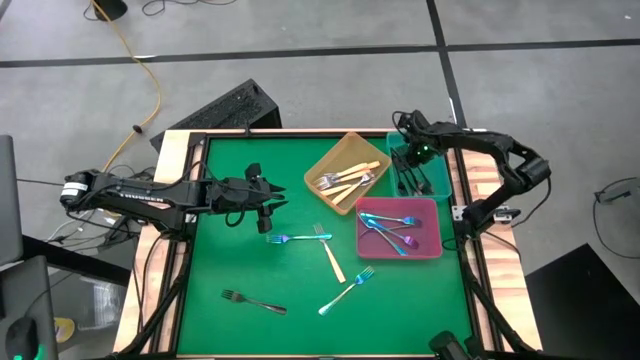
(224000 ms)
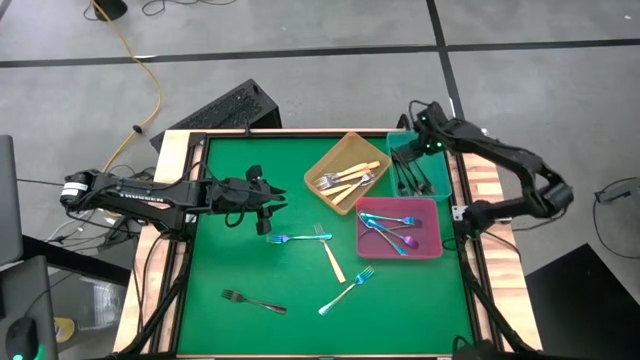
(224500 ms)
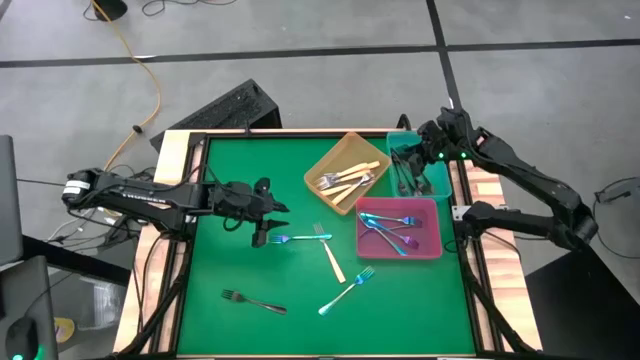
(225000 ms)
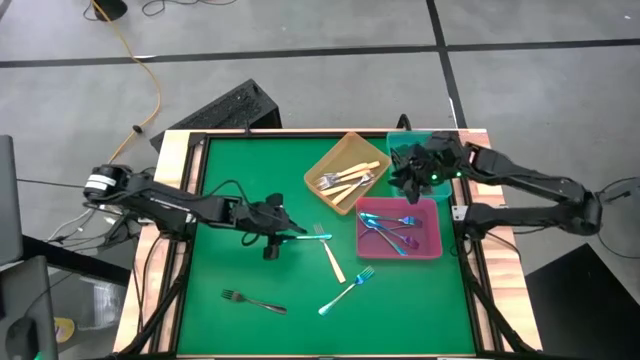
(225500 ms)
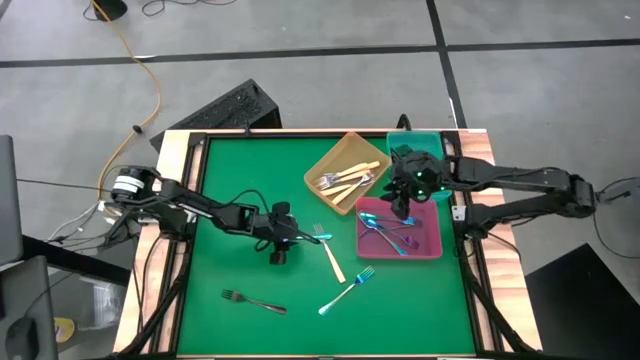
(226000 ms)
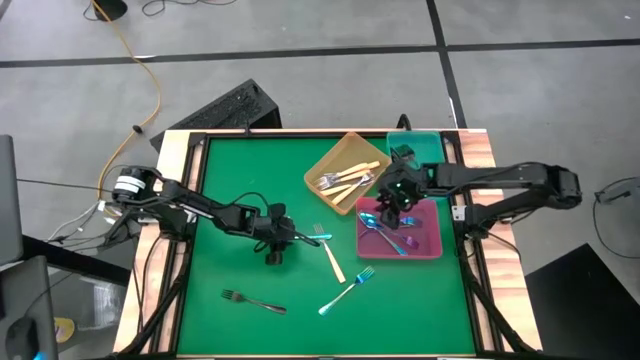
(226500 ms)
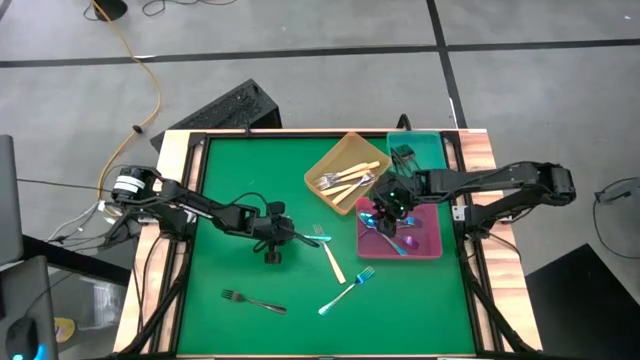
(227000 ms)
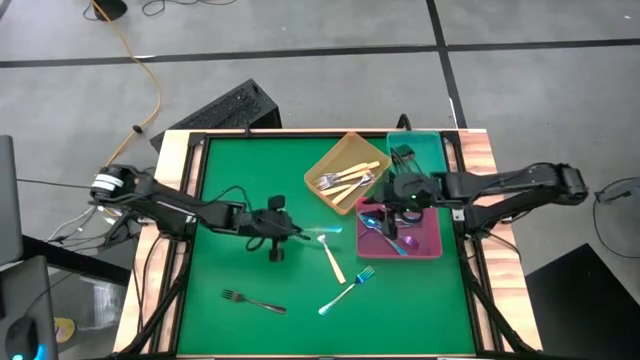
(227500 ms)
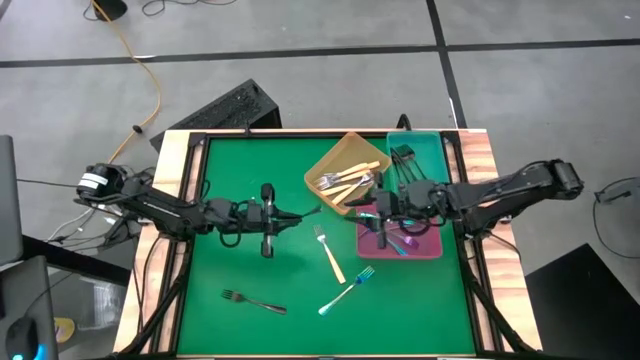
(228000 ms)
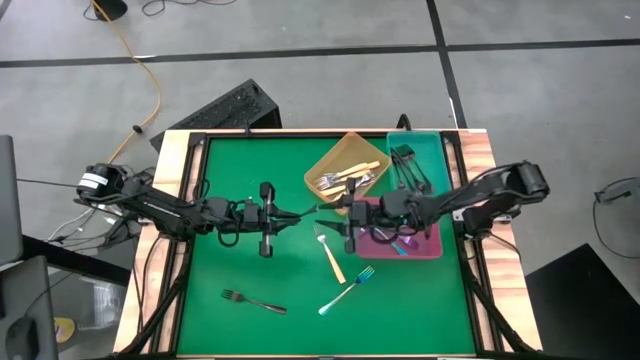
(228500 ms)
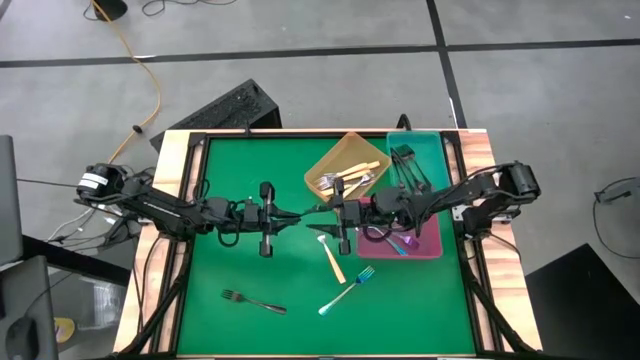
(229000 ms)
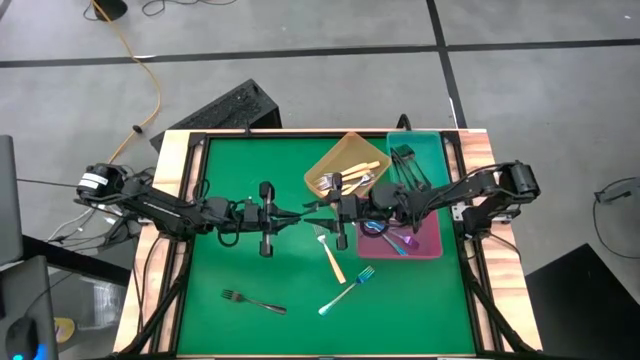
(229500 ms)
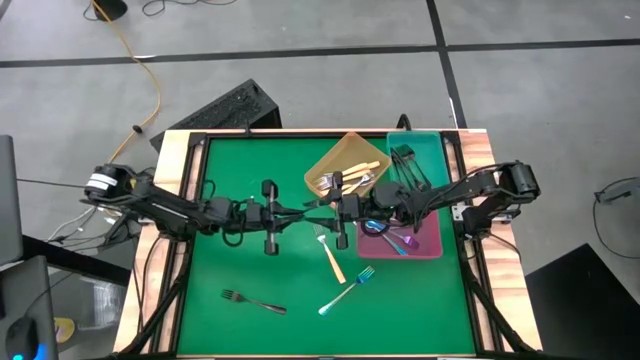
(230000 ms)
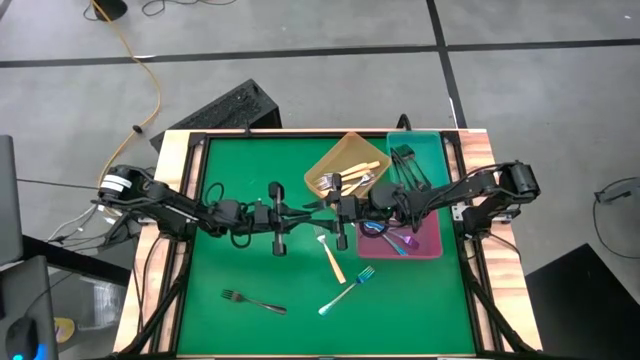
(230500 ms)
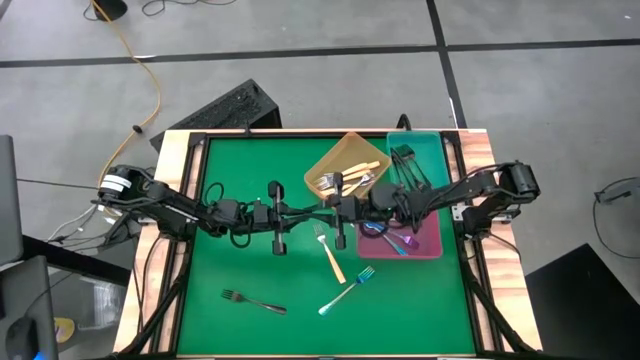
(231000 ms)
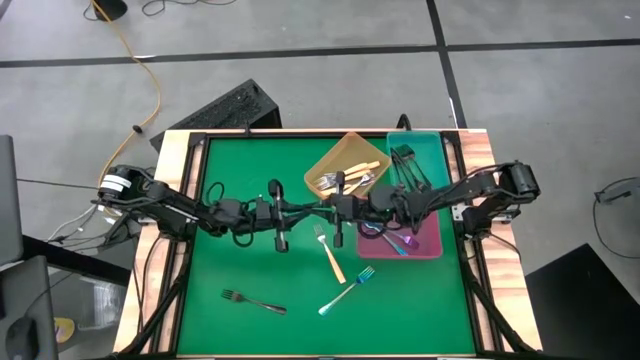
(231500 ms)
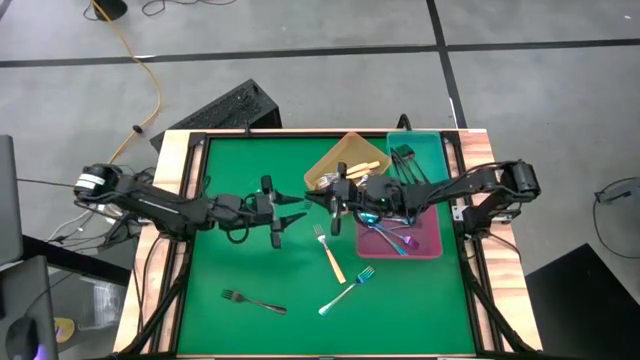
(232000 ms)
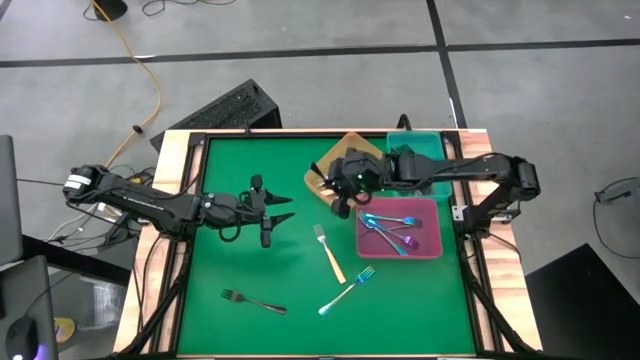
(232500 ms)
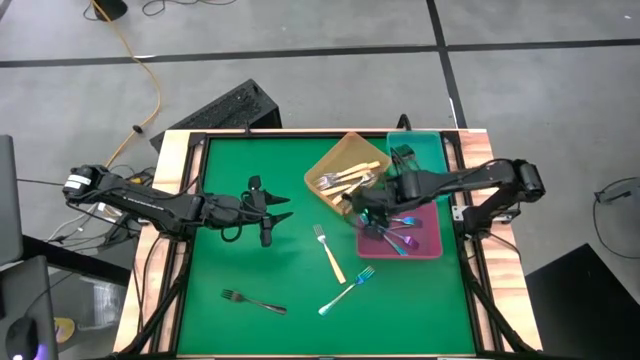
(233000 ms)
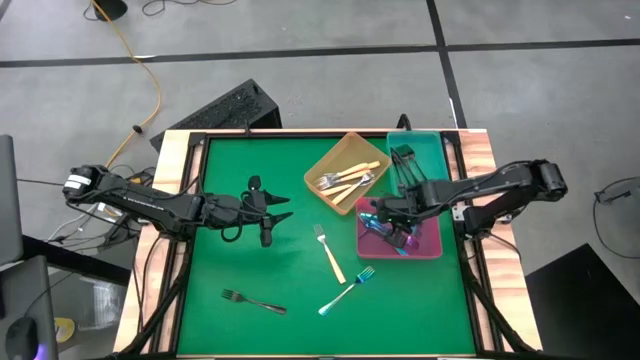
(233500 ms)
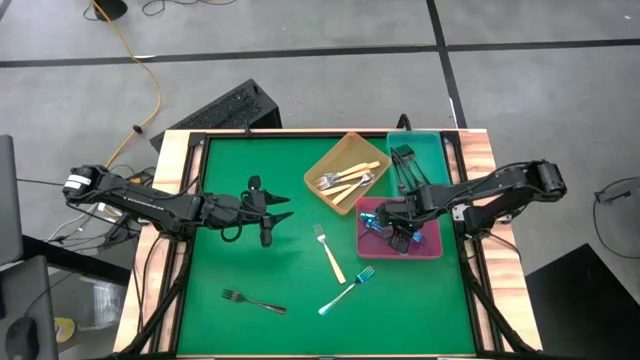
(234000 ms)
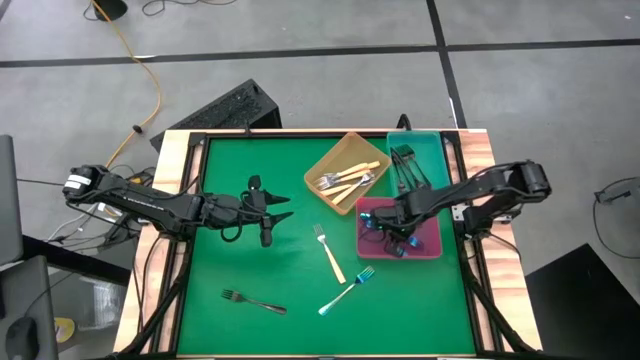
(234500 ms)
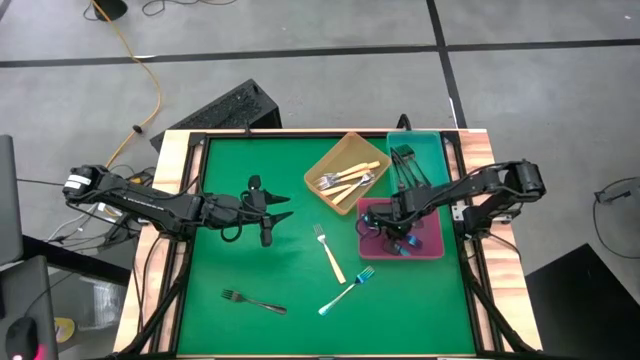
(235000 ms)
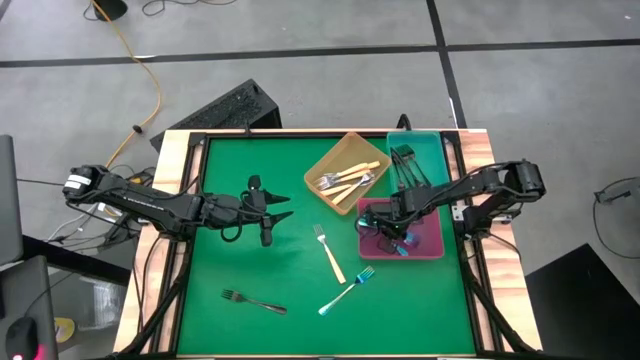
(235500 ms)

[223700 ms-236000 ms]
Task: Sort silverware by color (type)
Put the blue fork into the pink bin

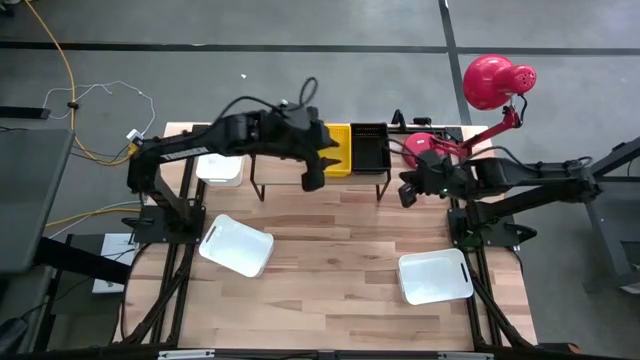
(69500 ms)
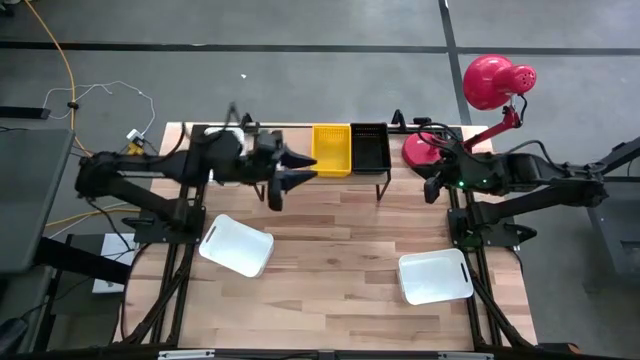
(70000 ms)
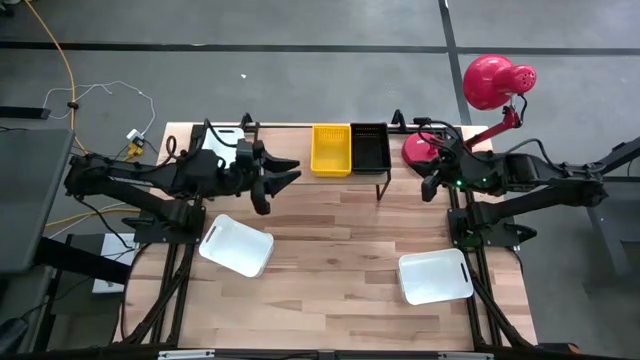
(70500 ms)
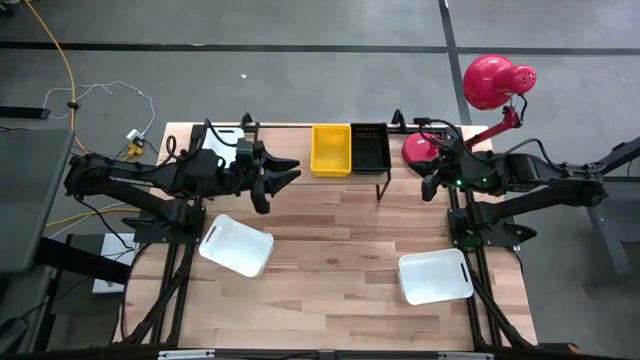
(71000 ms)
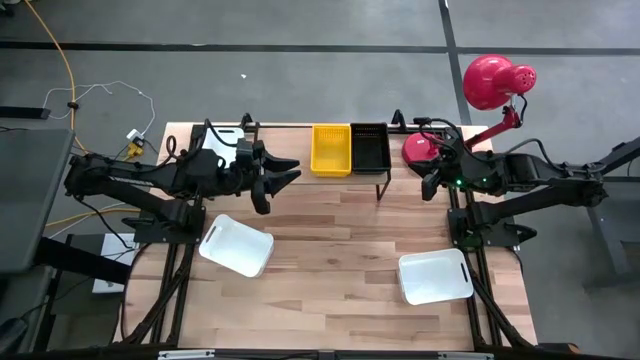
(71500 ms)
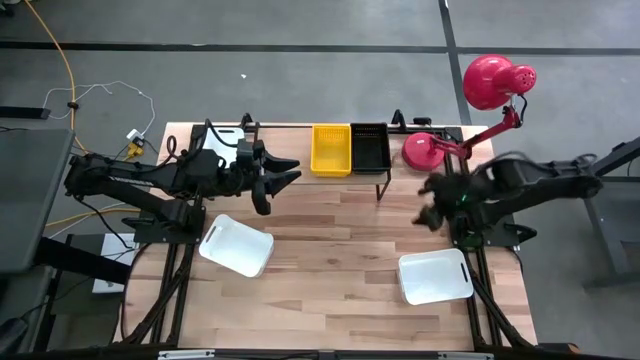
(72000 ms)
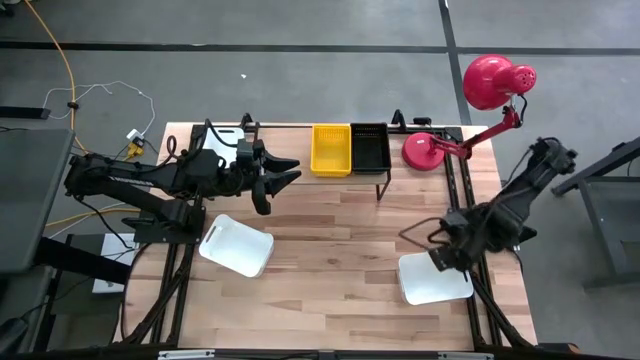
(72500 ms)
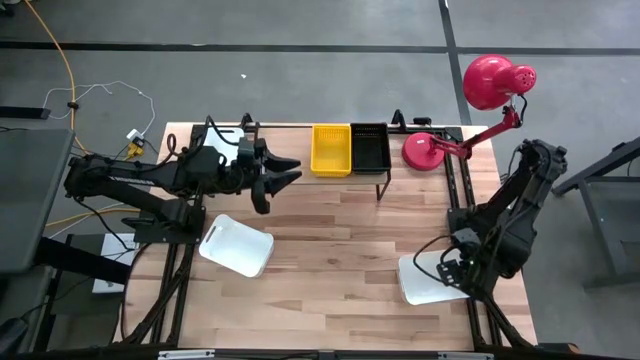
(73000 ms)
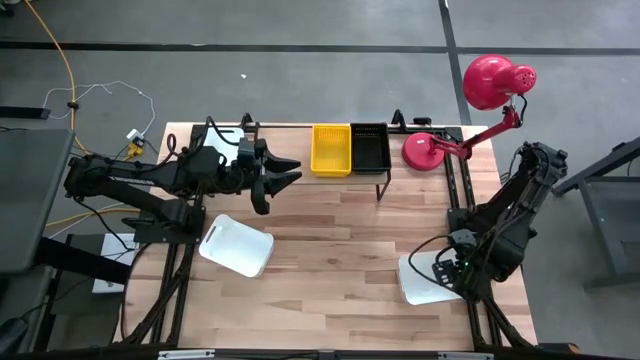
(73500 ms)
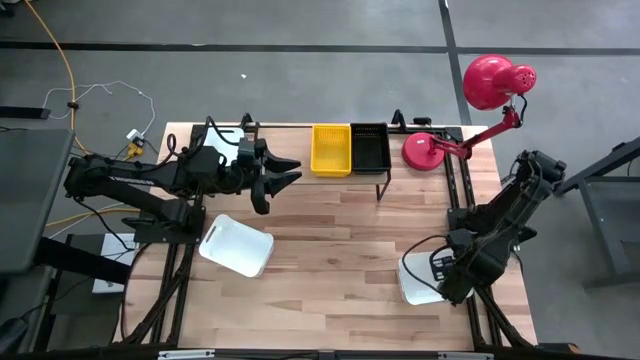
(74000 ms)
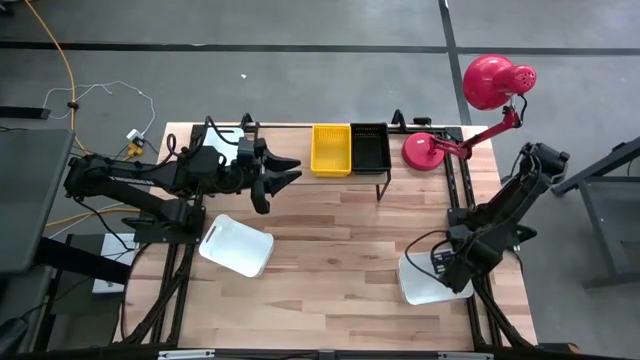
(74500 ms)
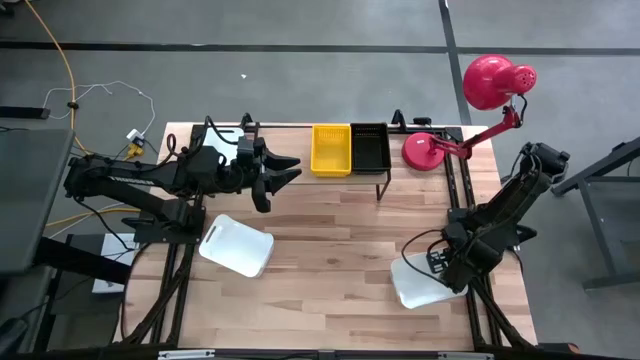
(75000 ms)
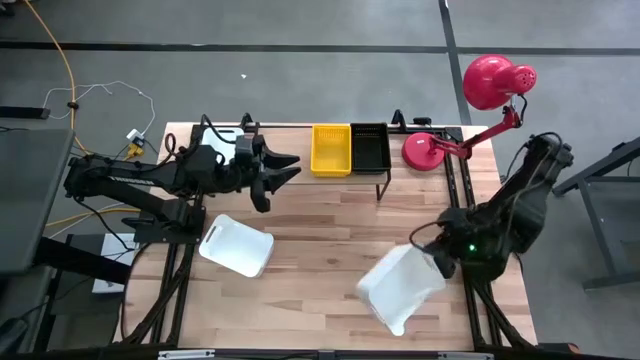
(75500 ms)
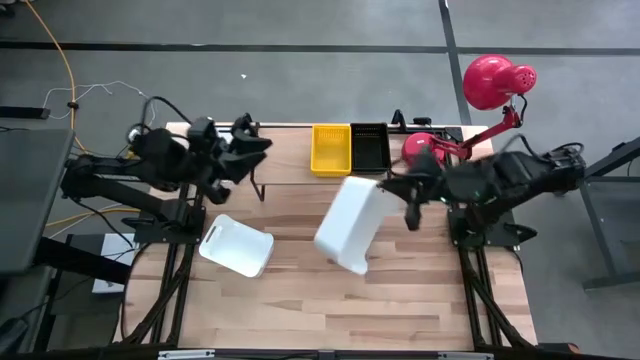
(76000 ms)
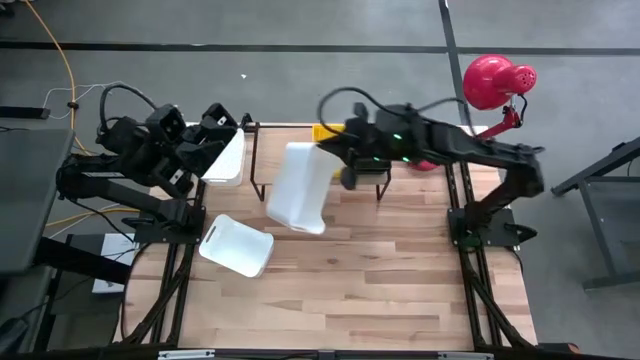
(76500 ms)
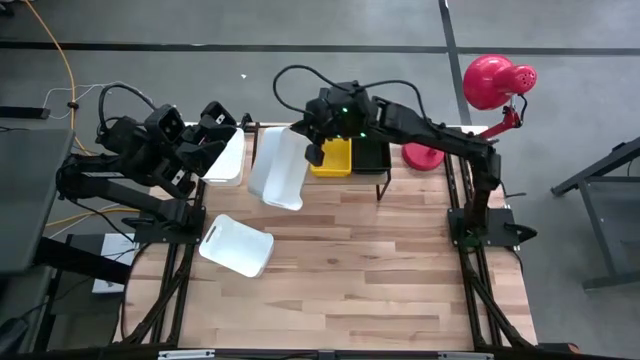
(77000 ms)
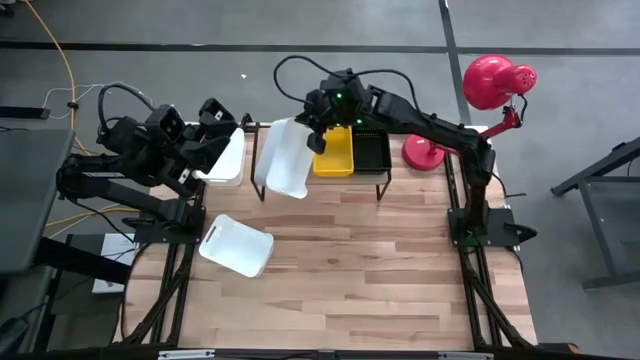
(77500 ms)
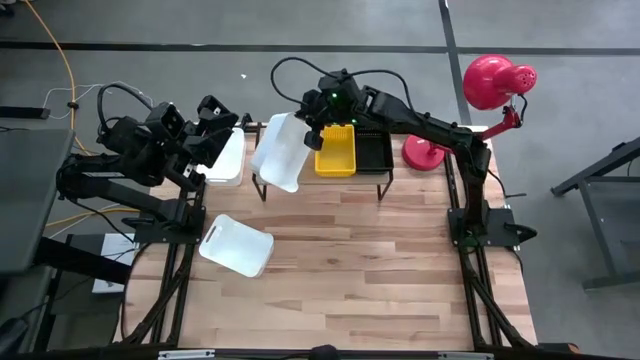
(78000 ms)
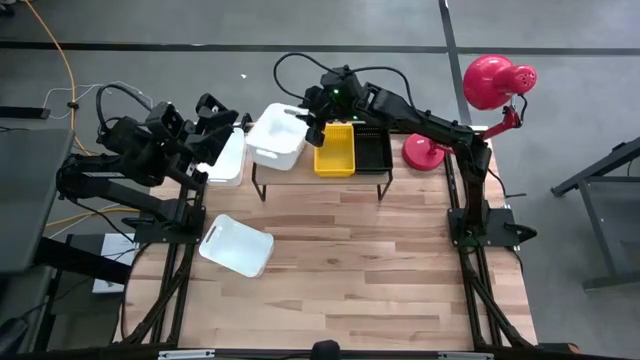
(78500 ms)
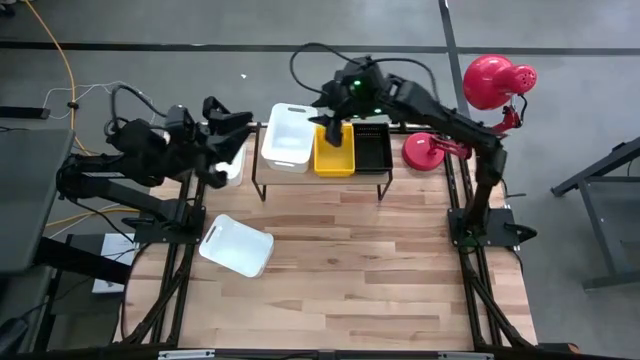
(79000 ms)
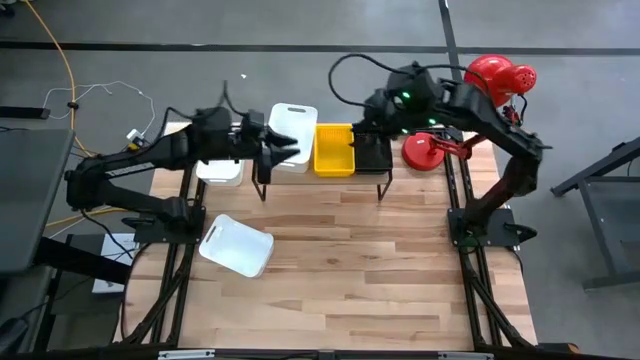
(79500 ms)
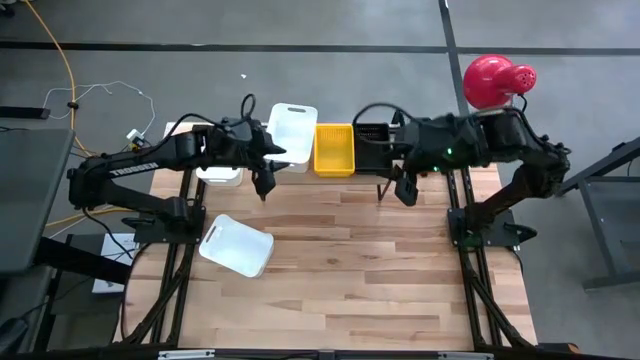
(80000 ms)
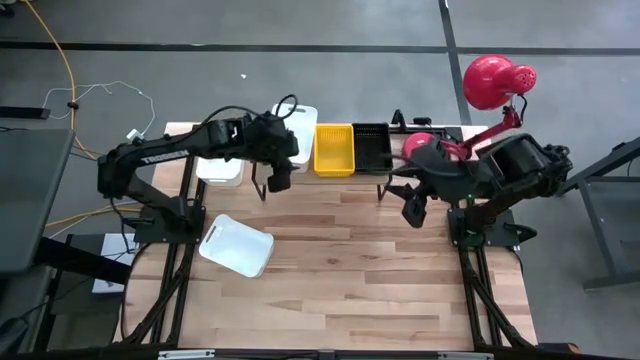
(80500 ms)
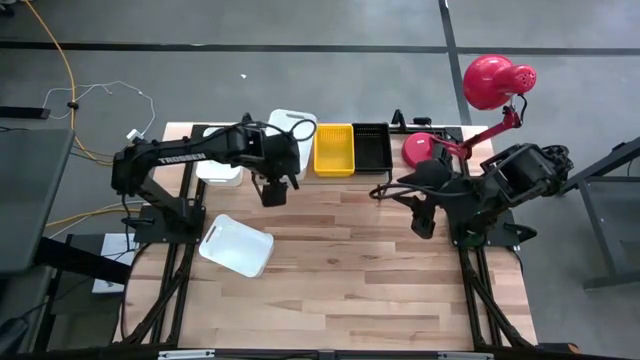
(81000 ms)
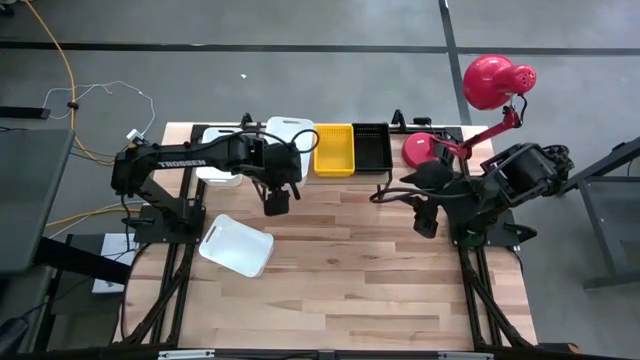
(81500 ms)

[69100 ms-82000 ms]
Task: Stack baskets on shelf by color
Put the bottom right white bin on the shelf
